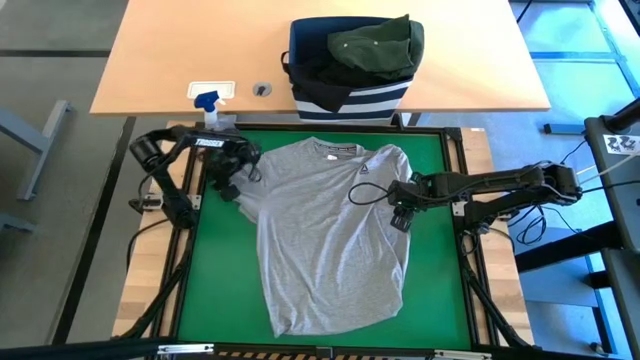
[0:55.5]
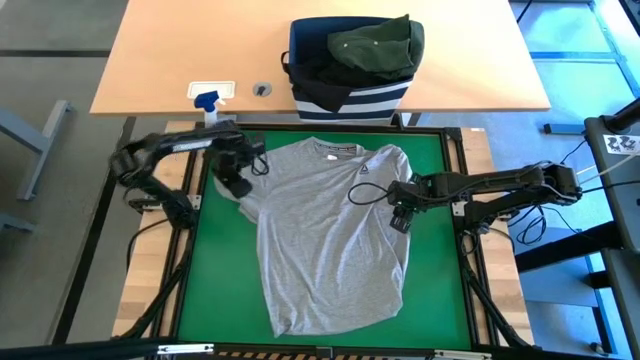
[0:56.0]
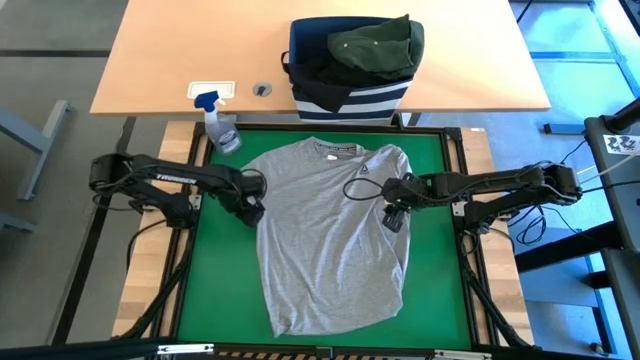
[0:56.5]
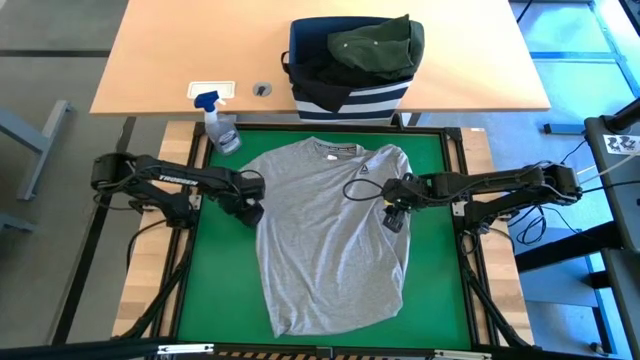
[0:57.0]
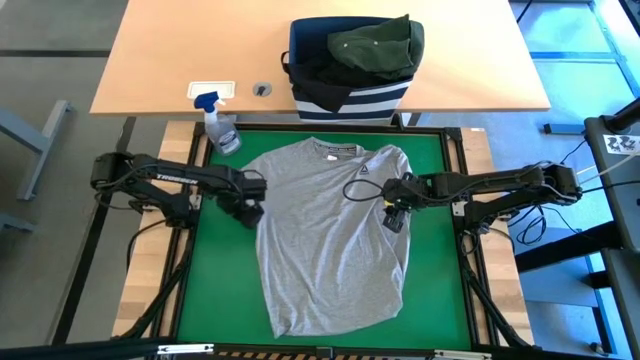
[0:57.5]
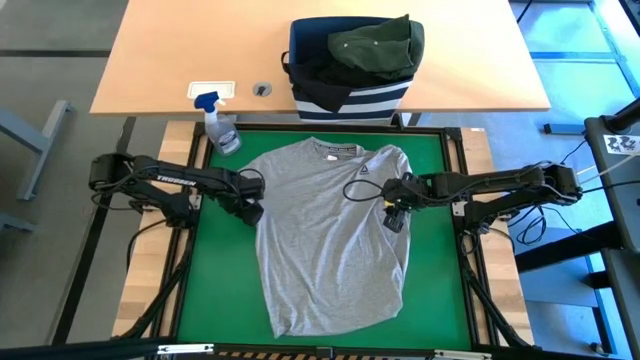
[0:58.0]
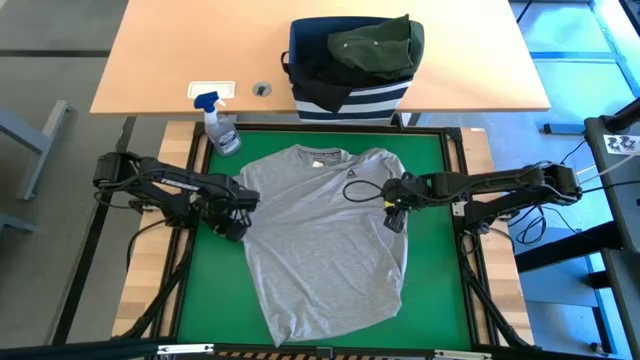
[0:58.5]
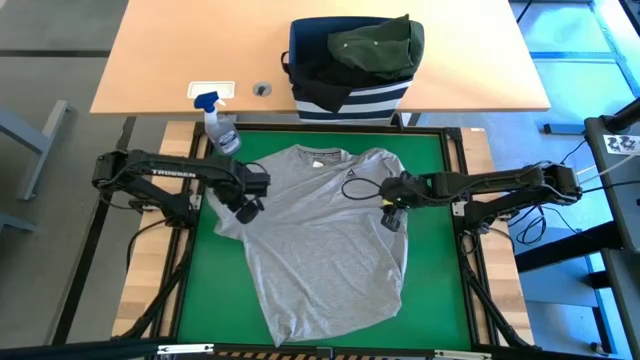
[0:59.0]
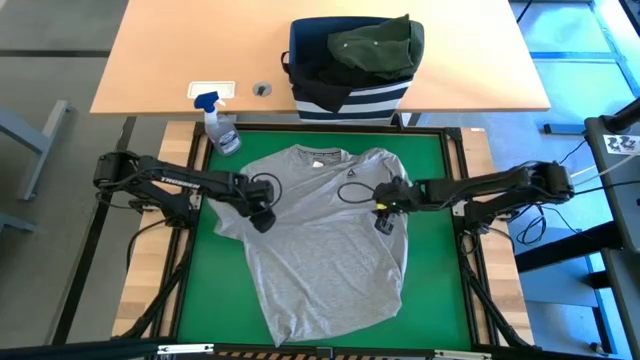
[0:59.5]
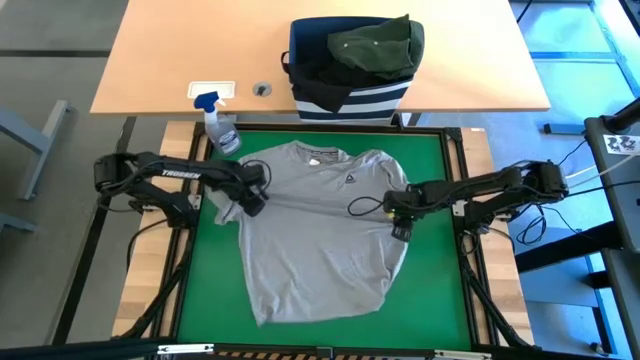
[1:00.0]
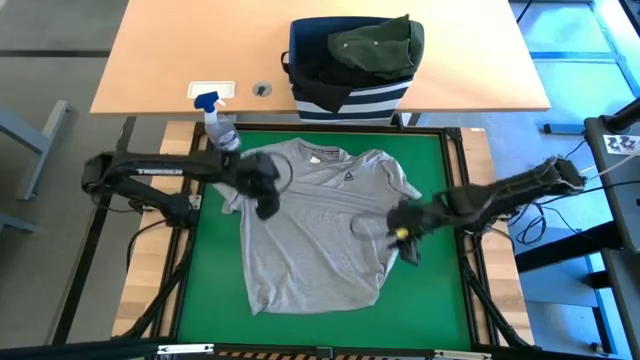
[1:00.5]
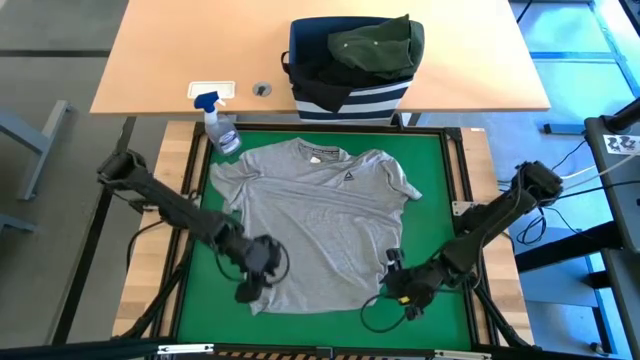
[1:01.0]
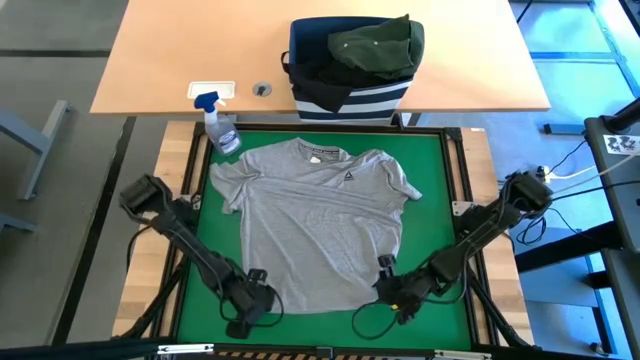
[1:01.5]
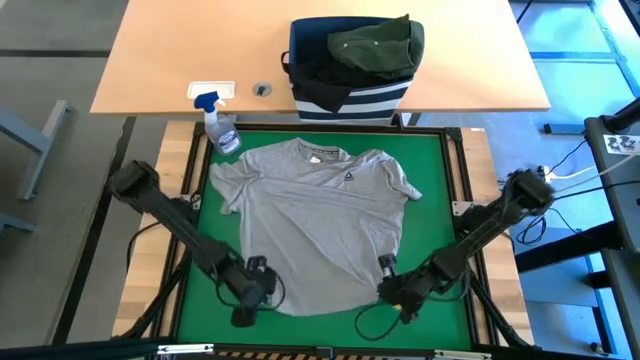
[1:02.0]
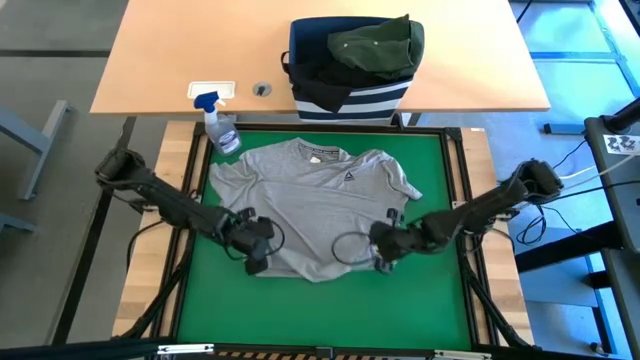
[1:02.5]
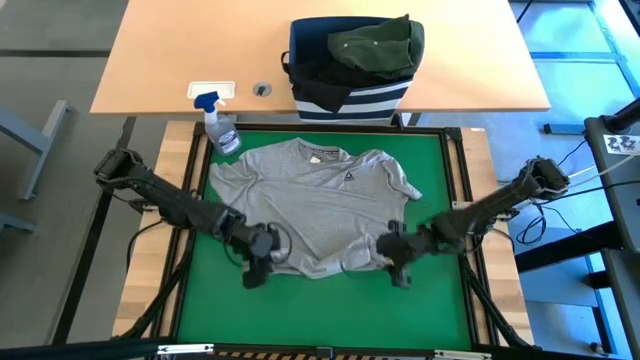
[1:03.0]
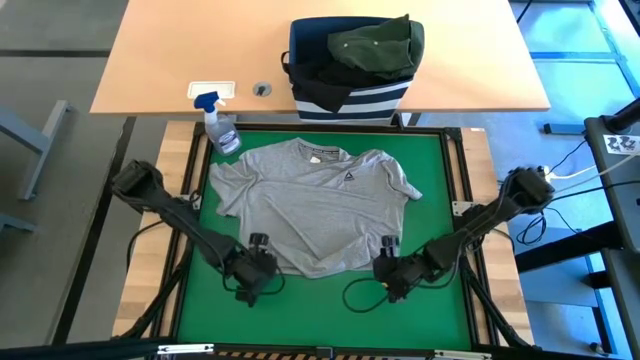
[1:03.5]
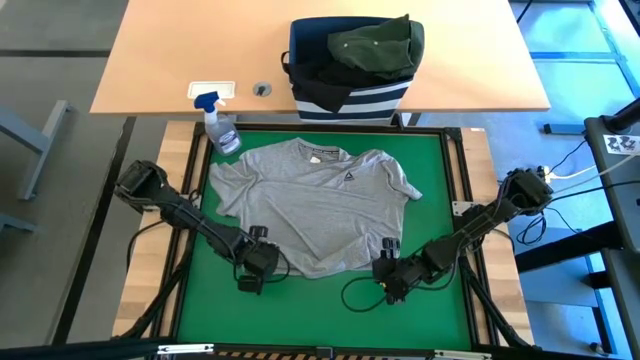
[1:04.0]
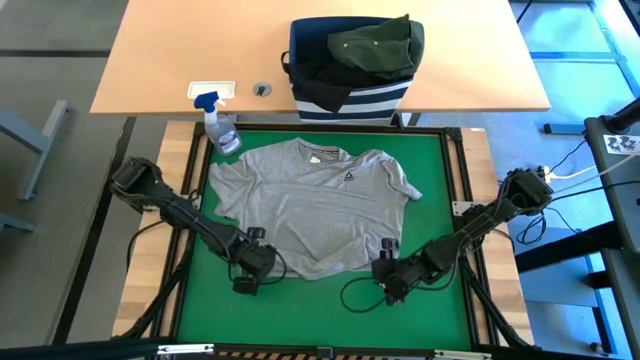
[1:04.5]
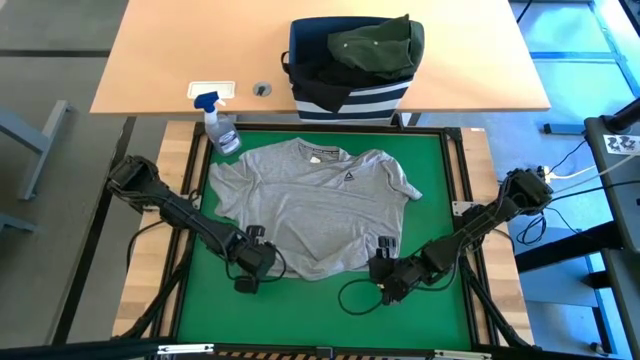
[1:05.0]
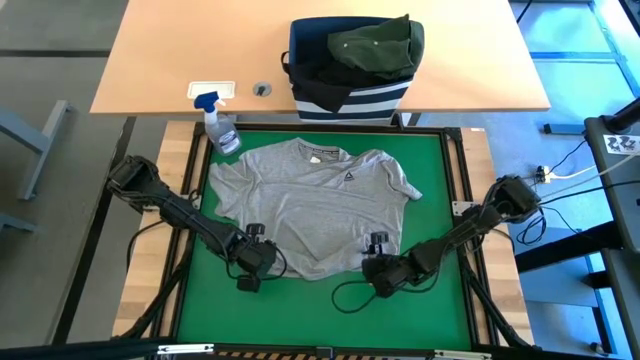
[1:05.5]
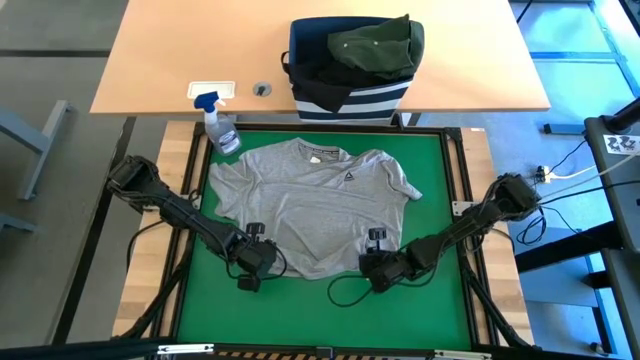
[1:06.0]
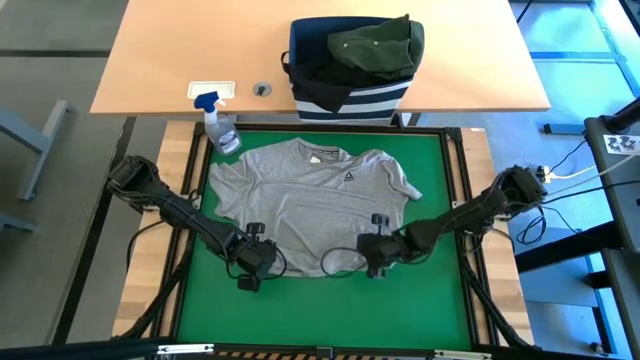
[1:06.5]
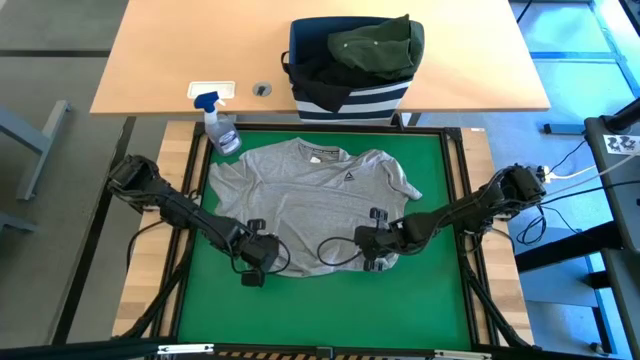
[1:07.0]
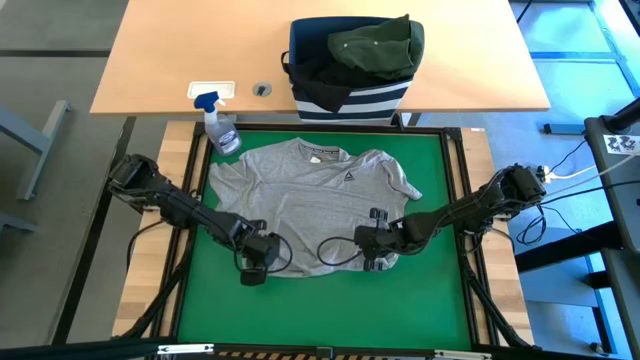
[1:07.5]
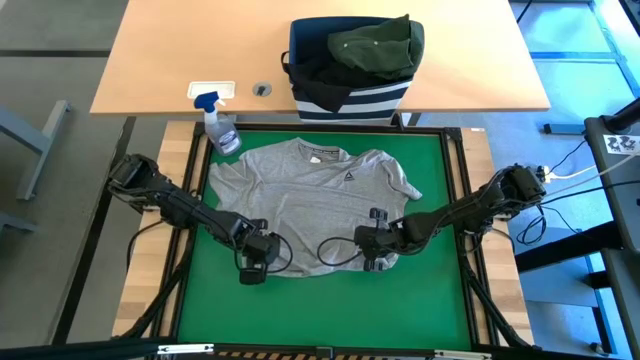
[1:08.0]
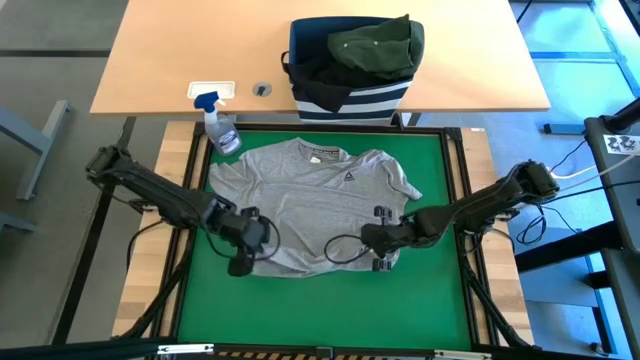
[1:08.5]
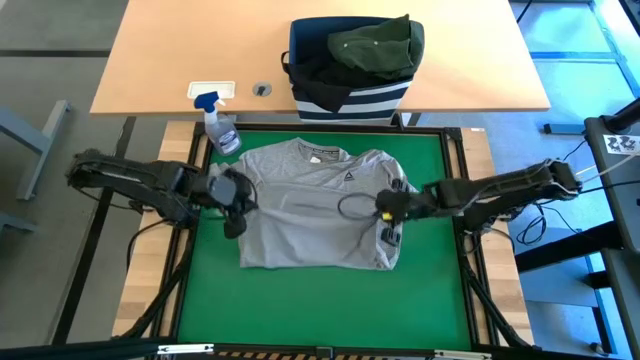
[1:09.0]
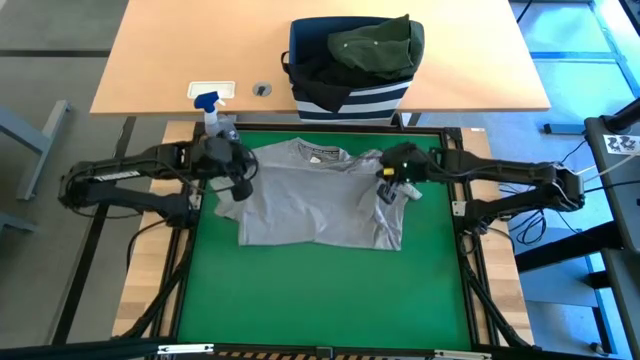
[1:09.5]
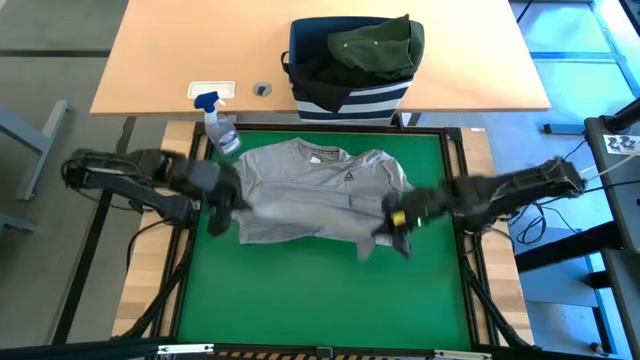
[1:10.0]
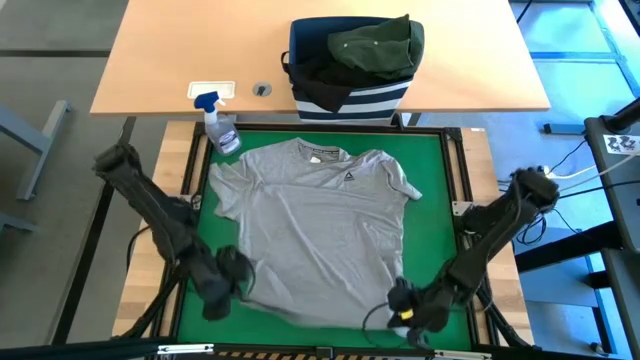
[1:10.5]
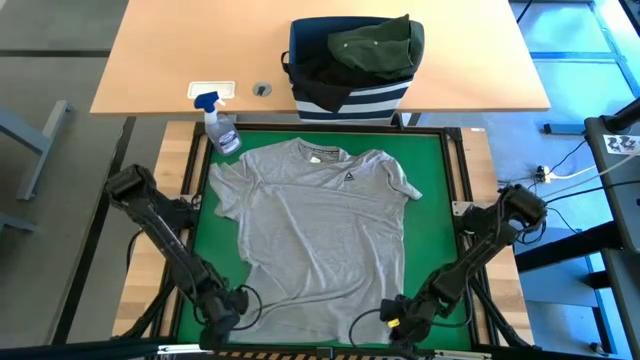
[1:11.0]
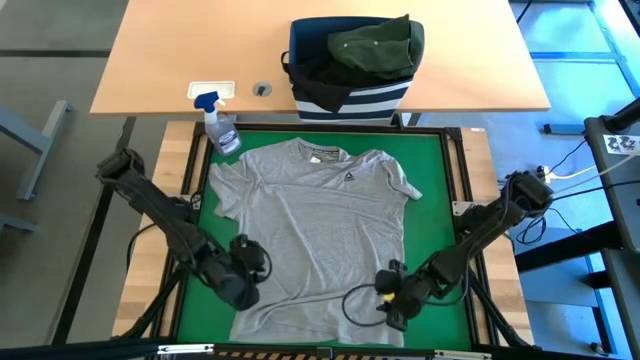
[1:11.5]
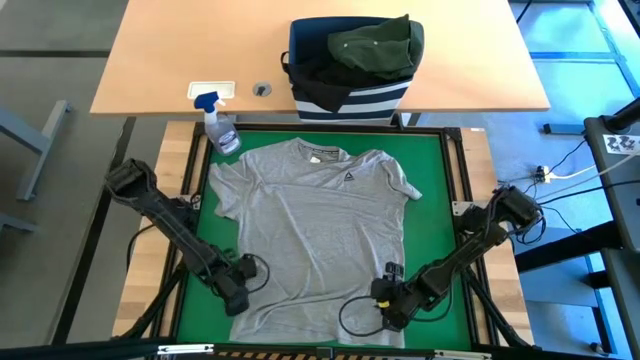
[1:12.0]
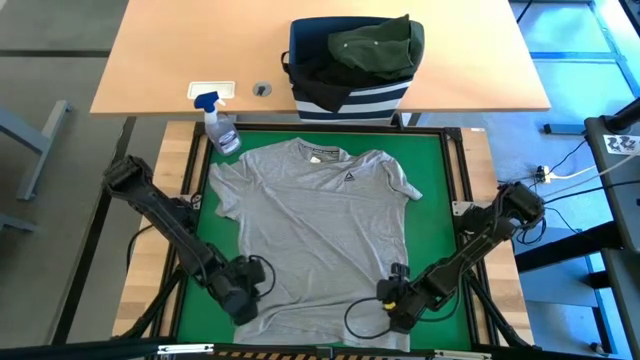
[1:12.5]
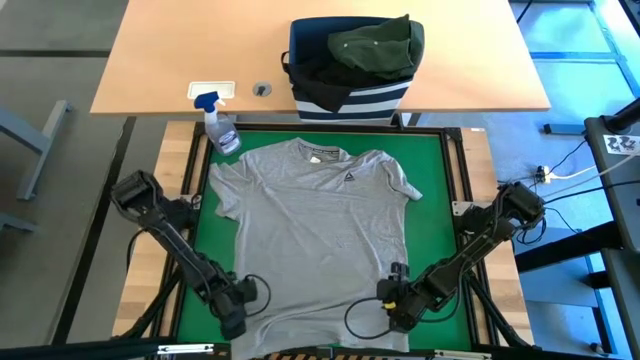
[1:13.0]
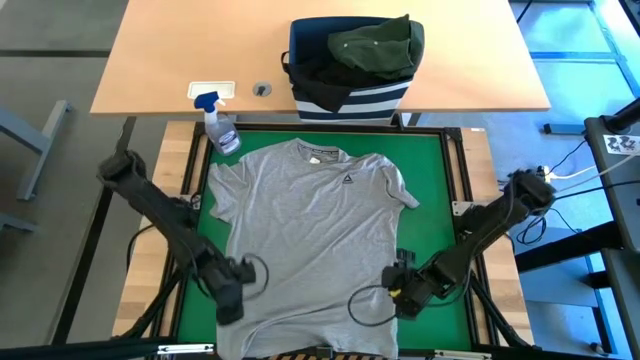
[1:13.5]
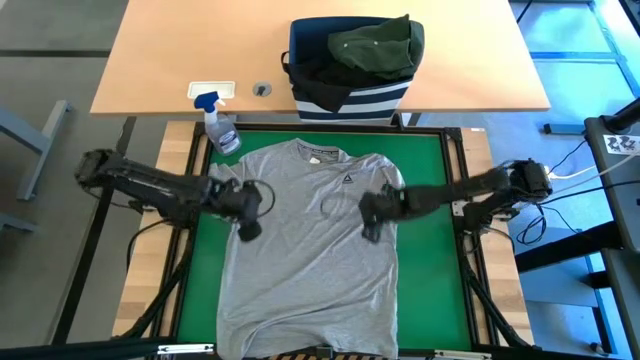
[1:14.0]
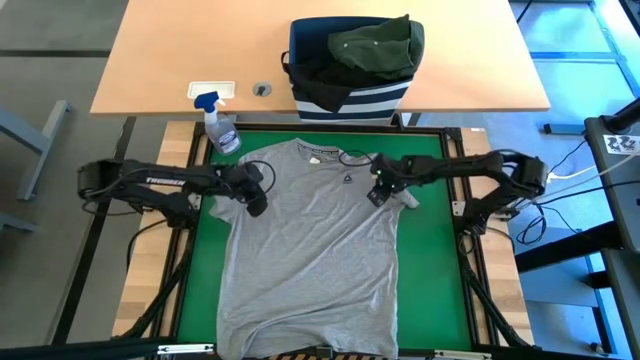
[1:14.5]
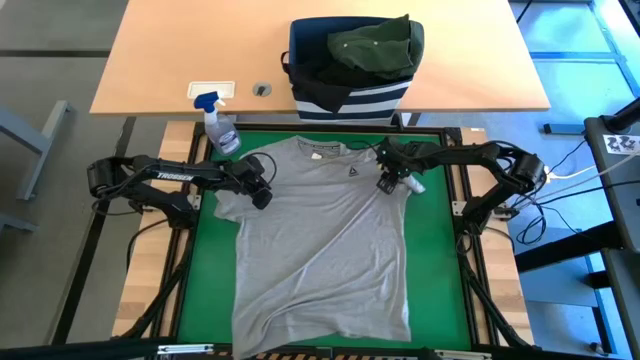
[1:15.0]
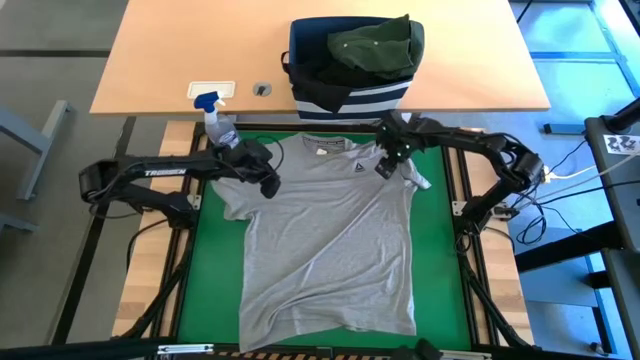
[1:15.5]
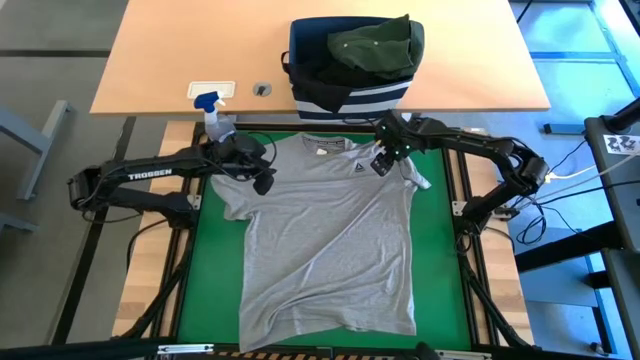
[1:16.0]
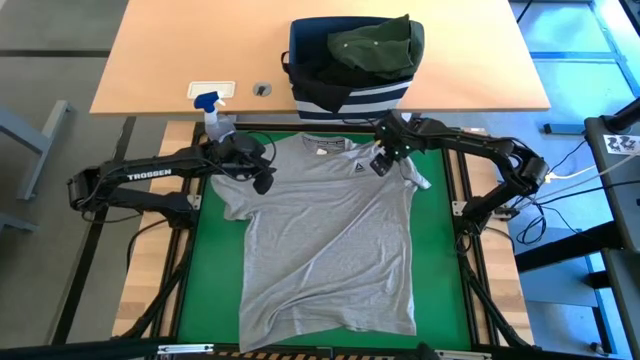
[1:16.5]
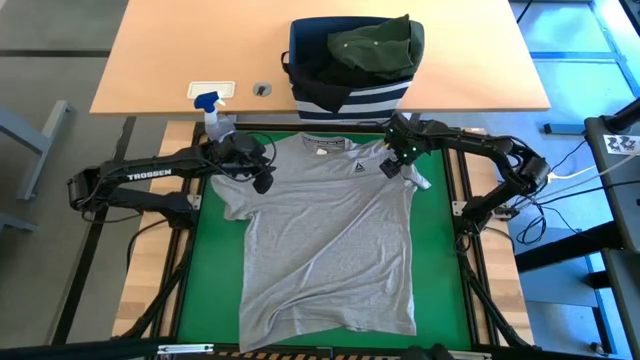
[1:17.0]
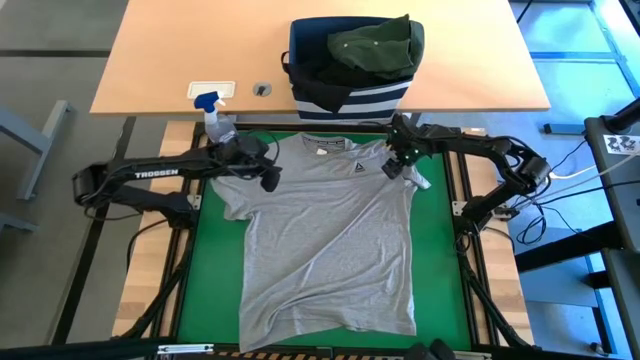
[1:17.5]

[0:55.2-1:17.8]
Task: Fold Laundry from Bin
Fold the gray shirt
